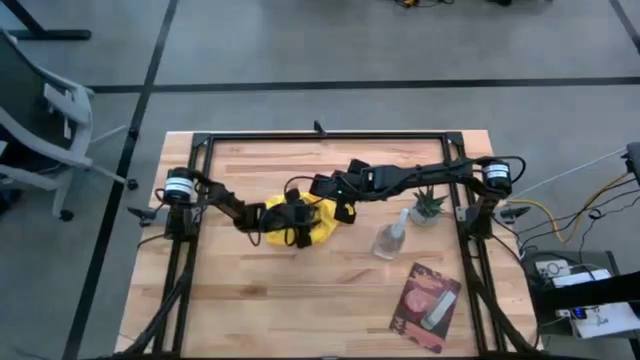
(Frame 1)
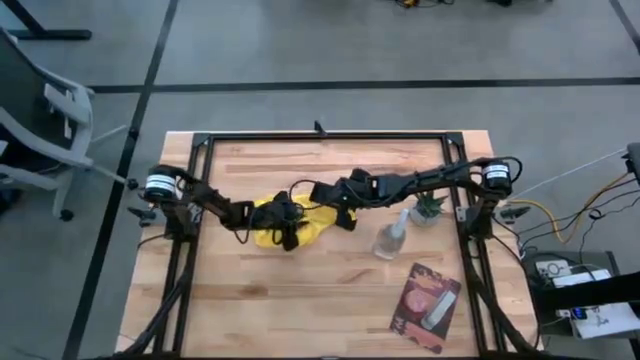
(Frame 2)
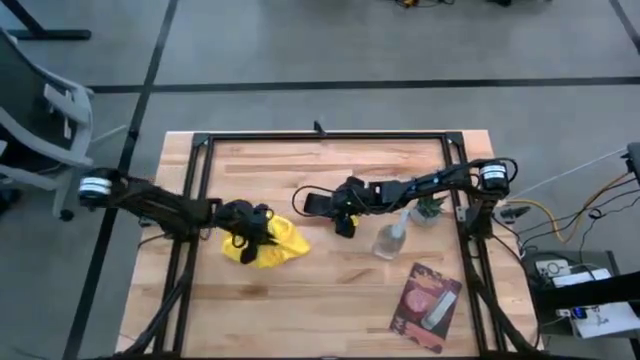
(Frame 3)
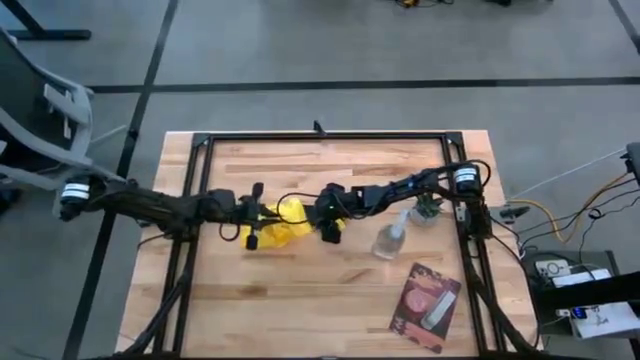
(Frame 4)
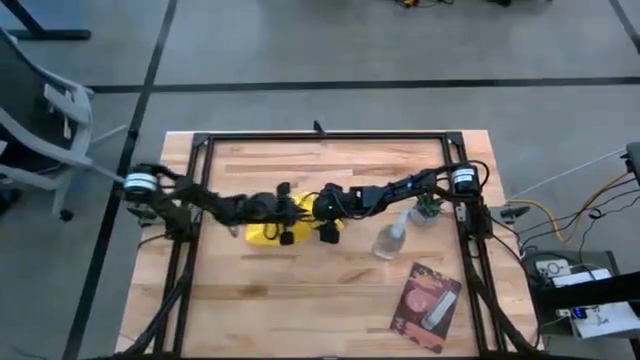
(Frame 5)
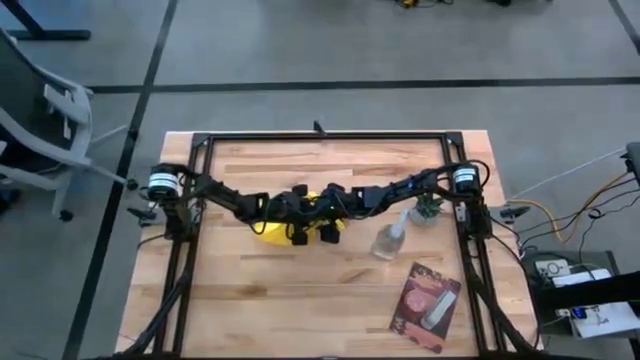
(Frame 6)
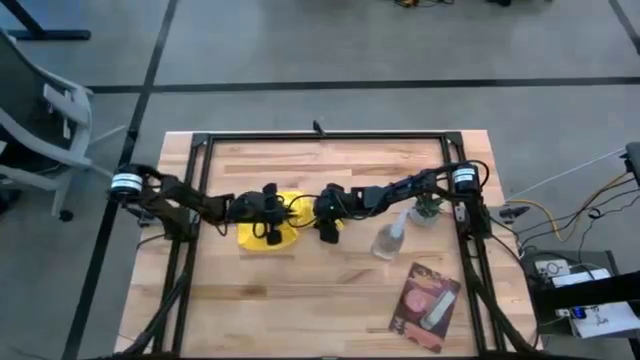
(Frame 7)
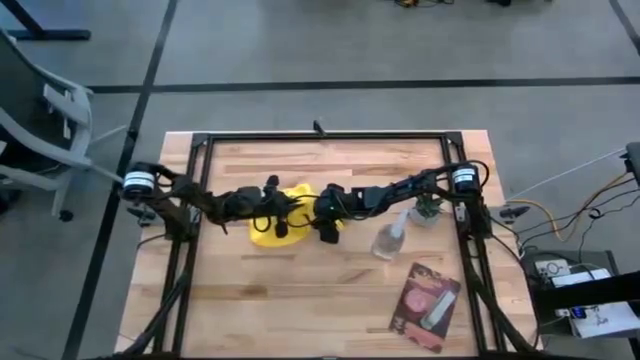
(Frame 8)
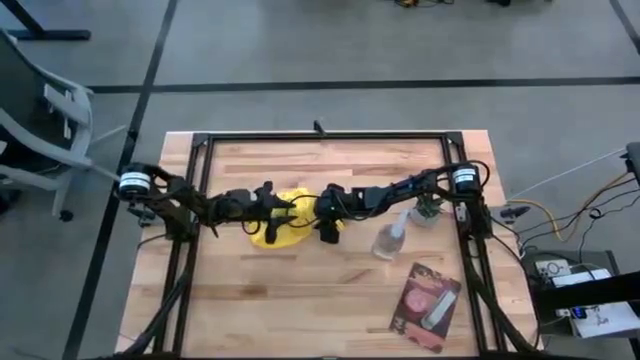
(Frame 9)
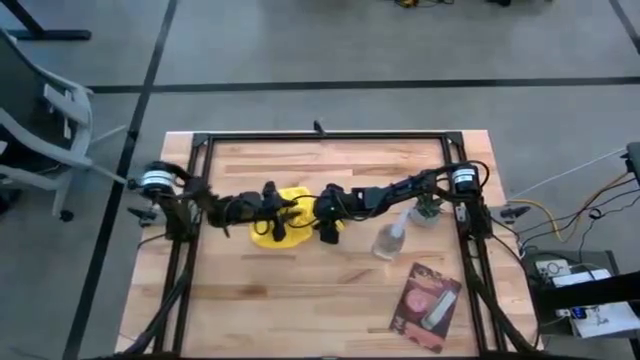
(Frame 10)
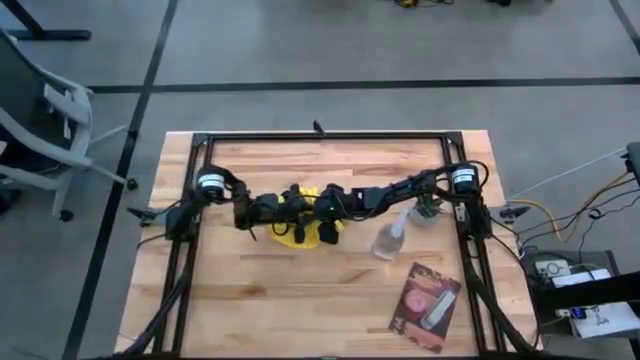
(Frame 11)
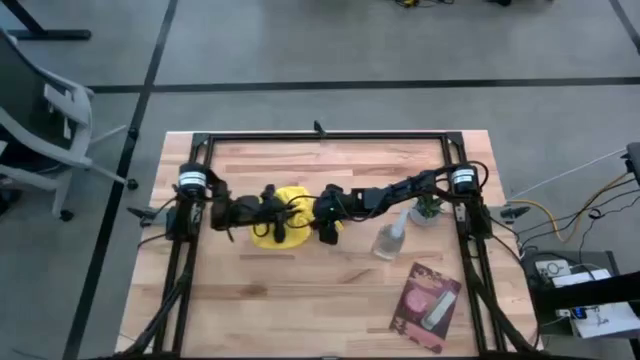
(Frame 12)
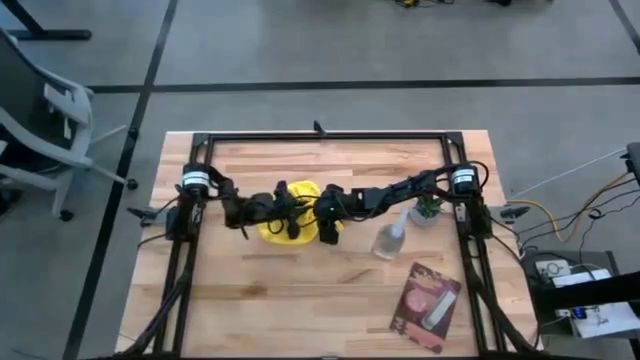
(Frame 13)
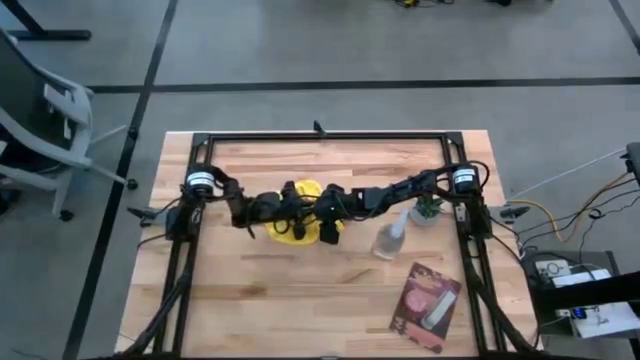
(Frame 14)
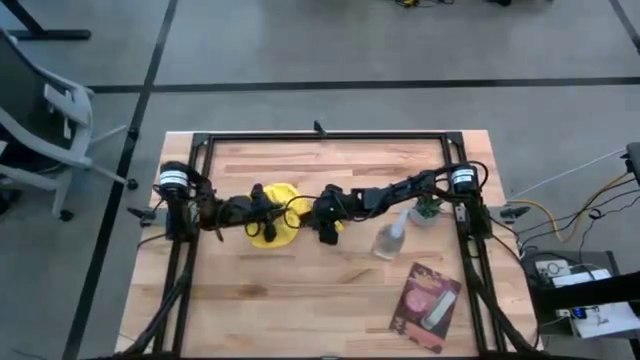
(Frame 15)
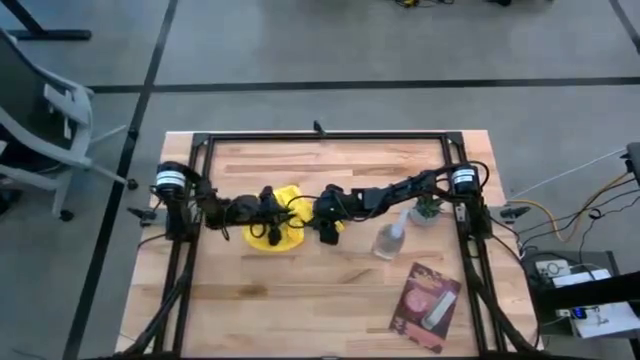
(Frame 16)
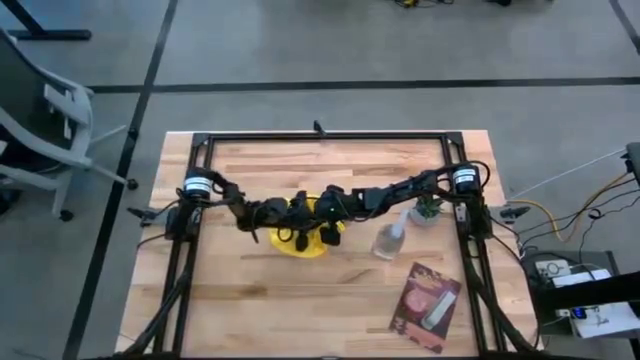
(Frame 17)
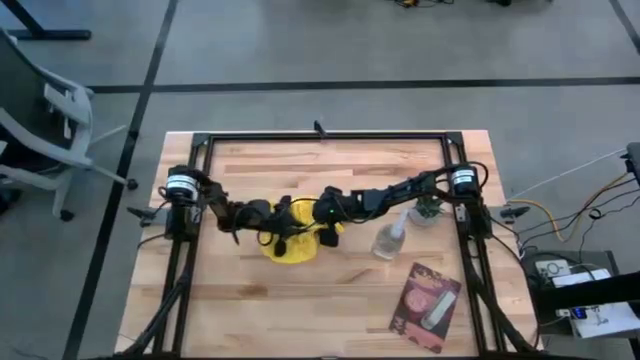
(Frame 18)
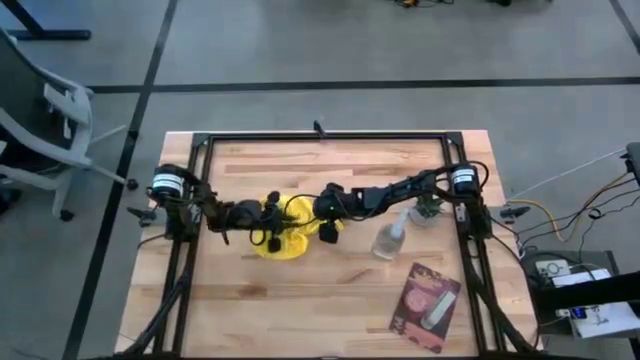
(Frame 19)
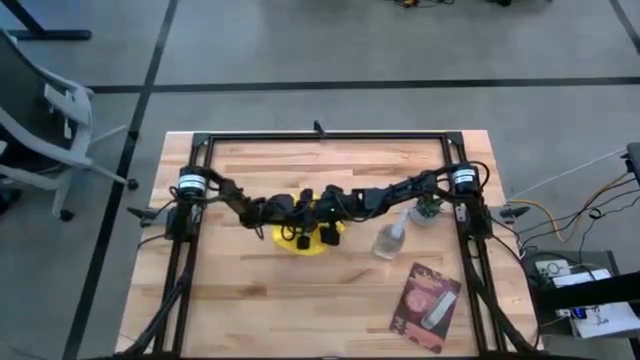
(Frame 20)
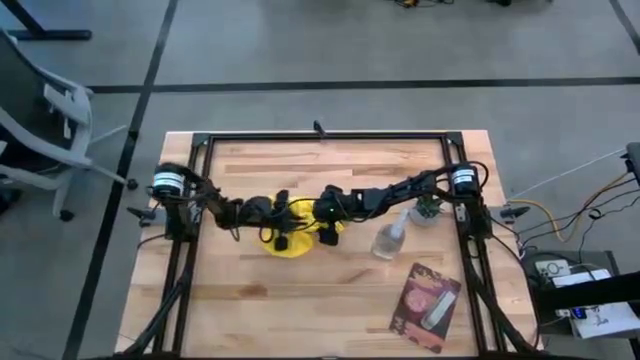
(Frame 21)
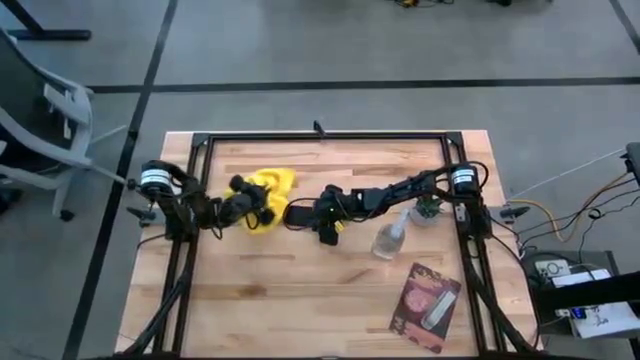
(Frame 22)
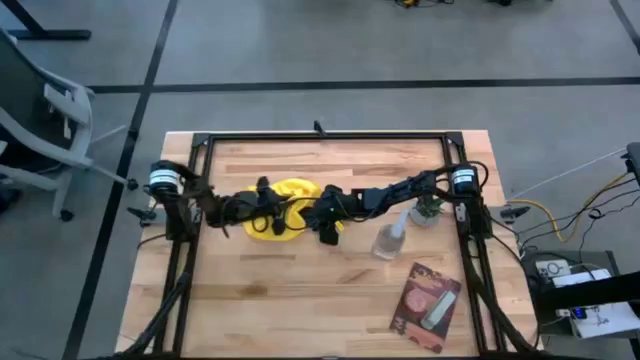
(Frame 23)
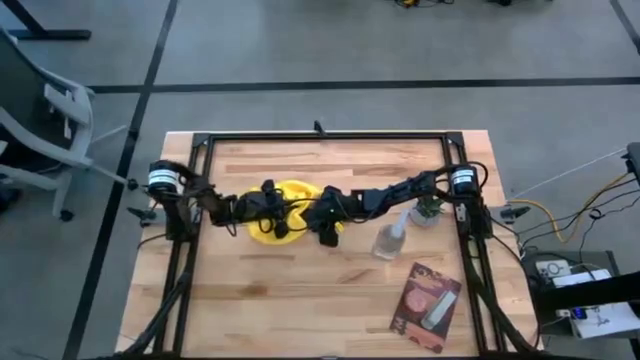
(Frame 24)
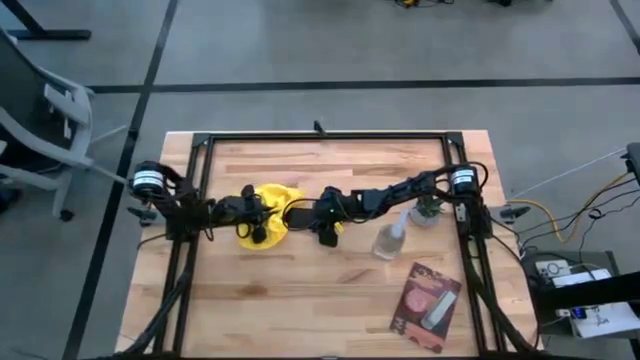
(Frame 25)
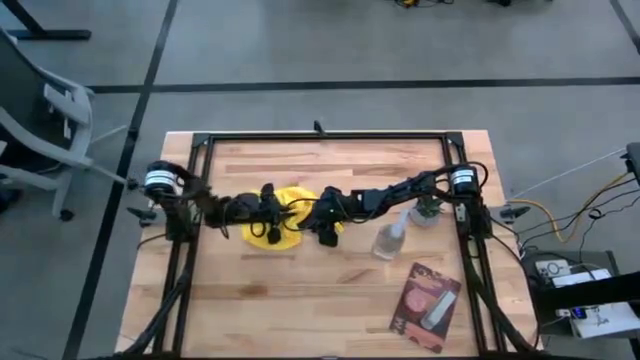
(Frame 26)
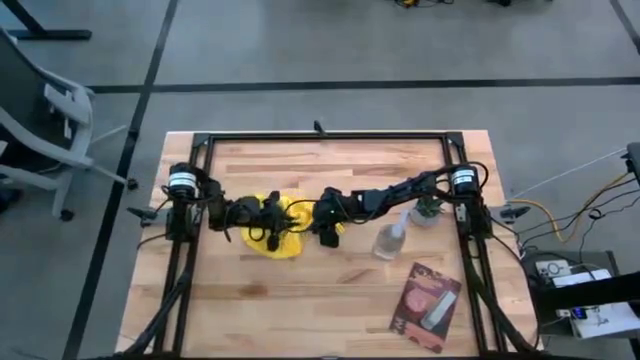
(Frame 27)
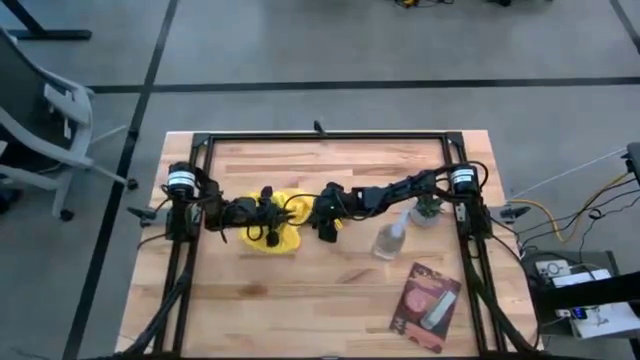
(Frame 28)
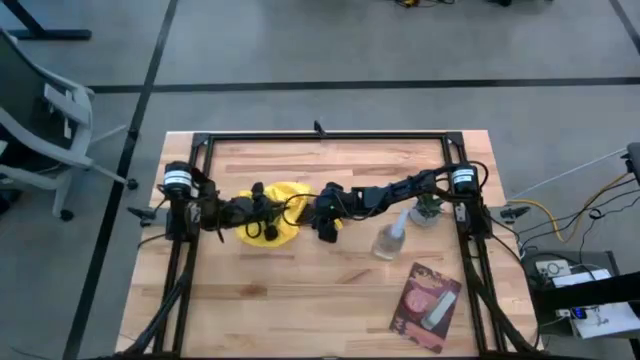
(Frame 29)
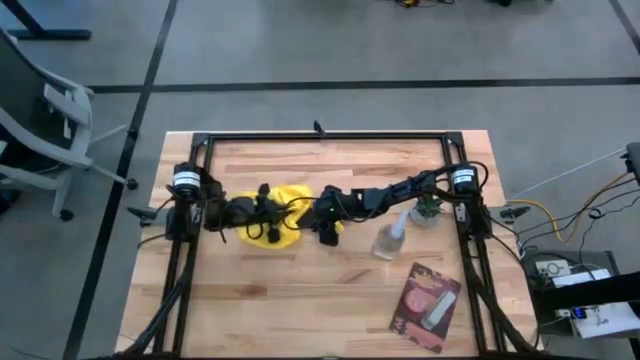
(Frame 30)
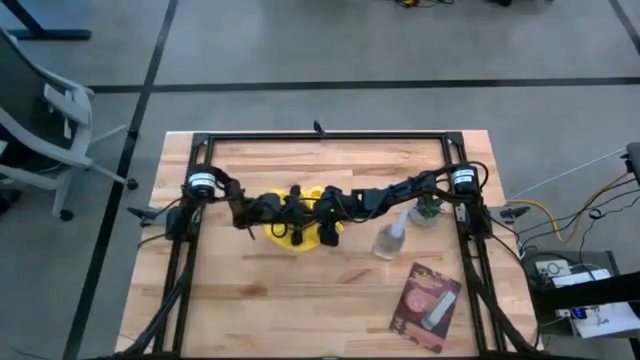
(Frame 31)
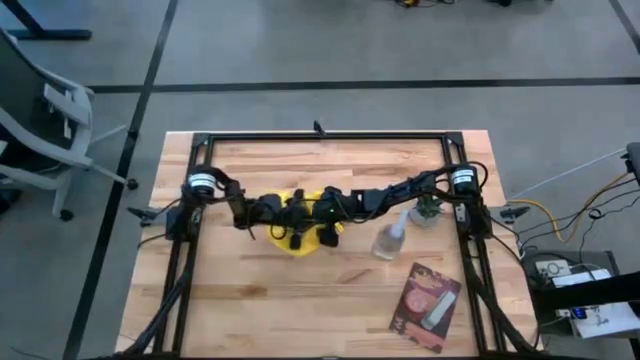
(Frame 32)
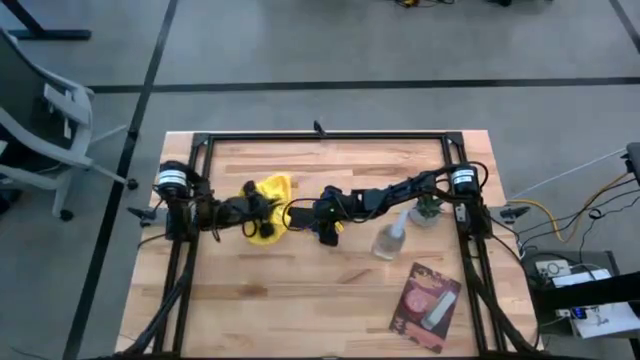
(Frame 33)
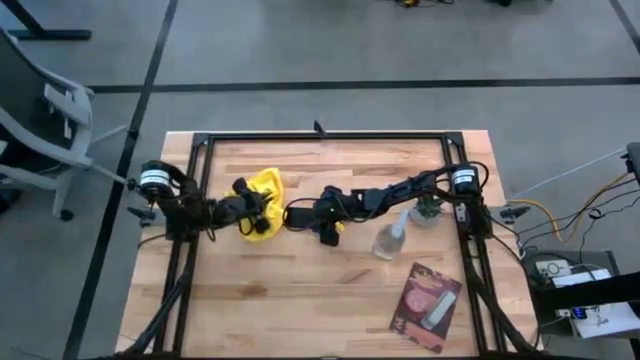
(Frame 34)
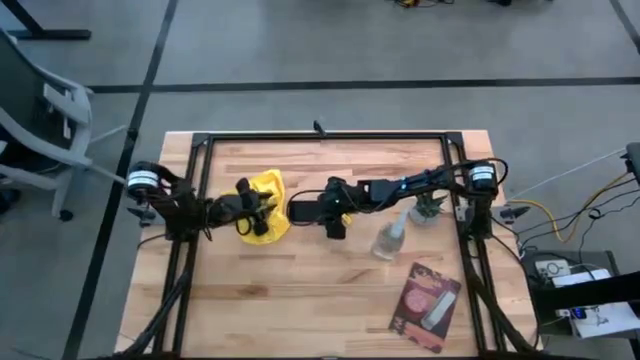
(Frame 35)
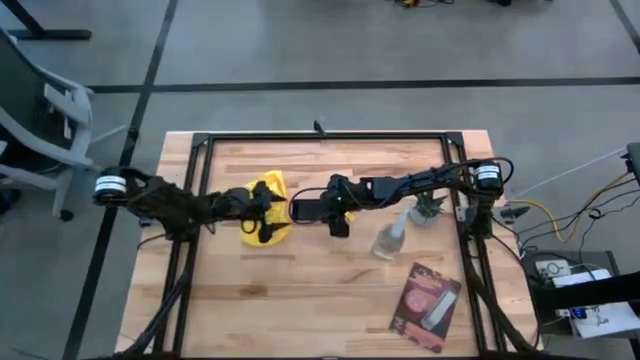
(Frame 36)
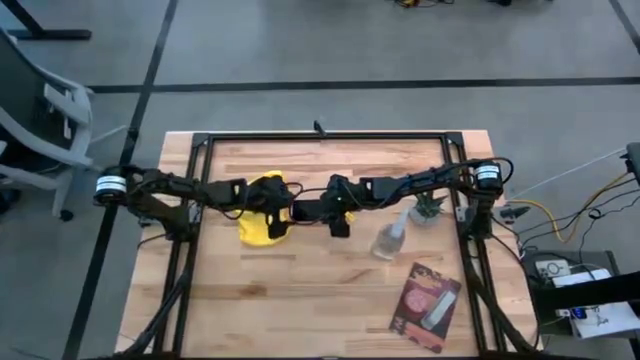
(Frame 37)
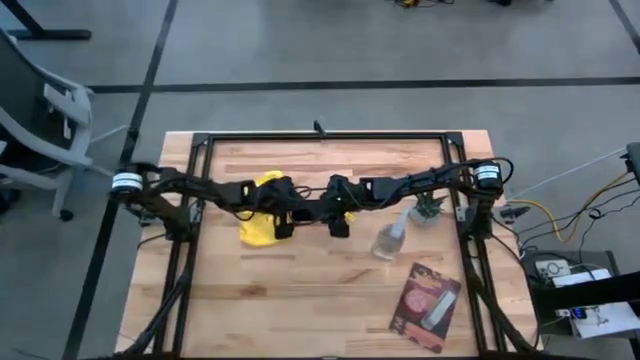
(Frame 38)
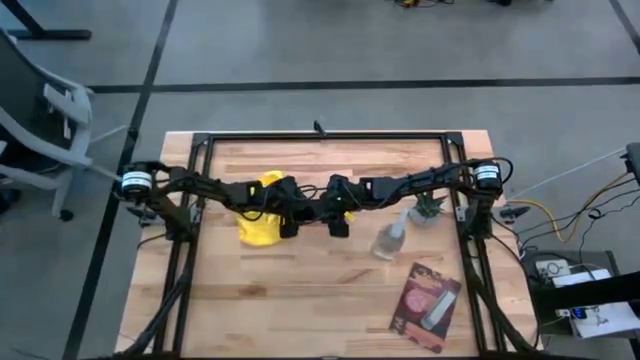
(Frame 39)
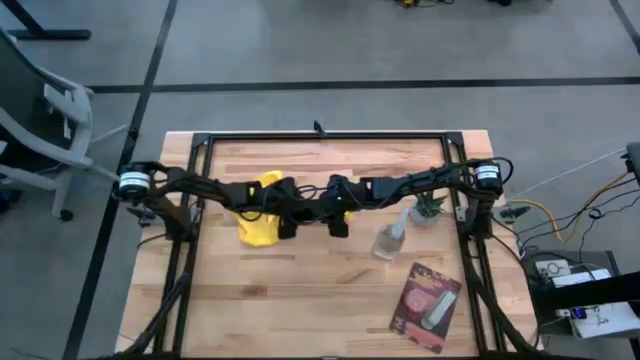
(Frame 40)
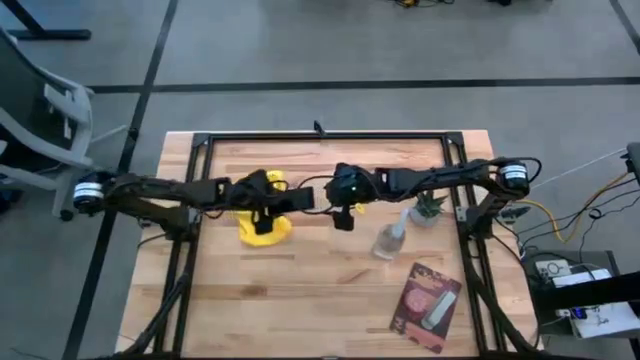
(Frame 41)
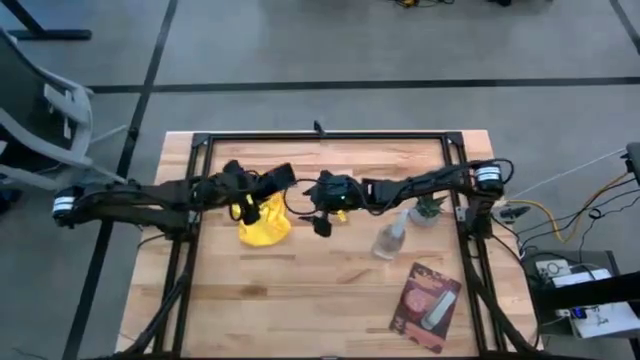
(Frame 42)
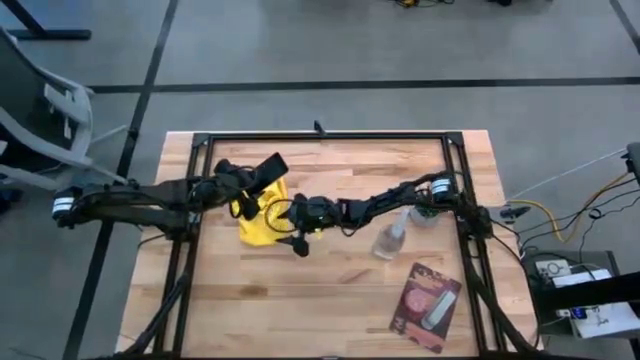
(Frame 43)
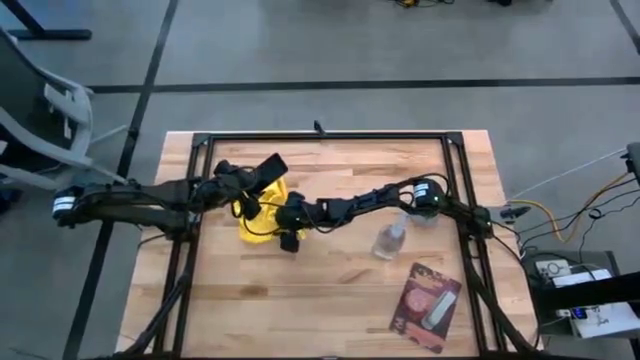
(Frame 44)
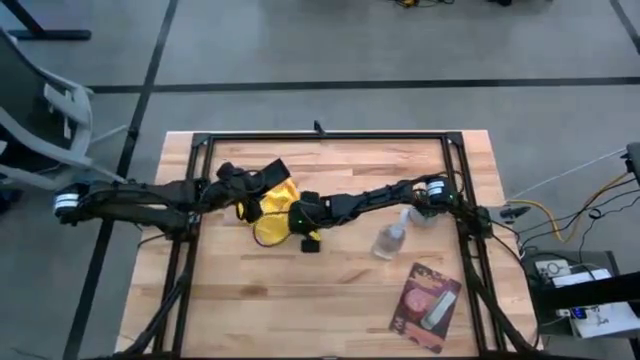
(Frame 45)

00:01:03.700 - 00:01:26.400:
Task: Apply microfiber cloth
Wipe the front of the pink cellphone with a microfiber cloth
